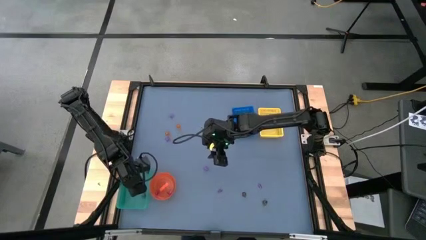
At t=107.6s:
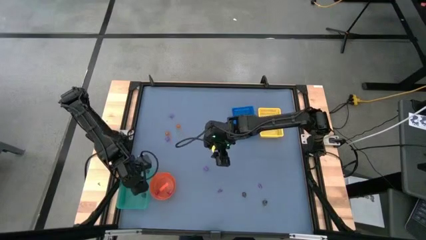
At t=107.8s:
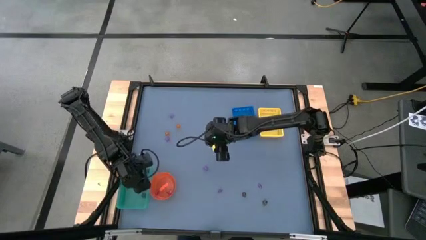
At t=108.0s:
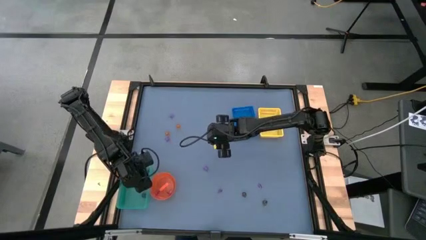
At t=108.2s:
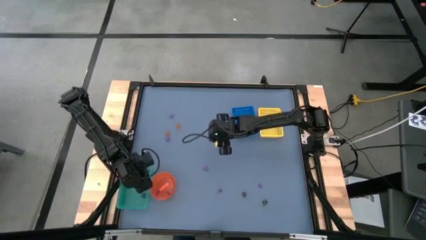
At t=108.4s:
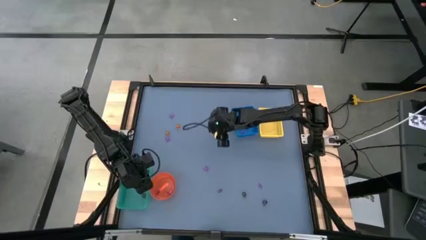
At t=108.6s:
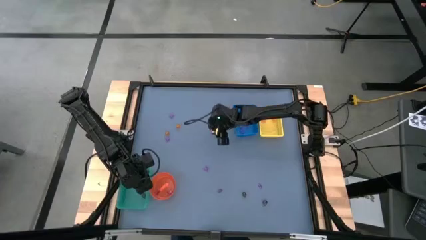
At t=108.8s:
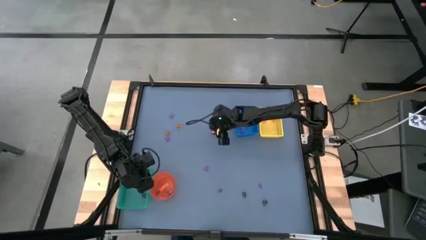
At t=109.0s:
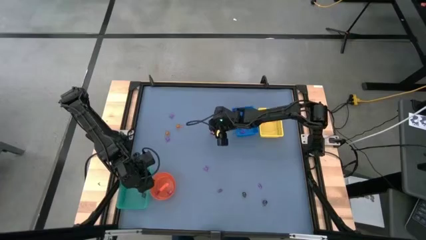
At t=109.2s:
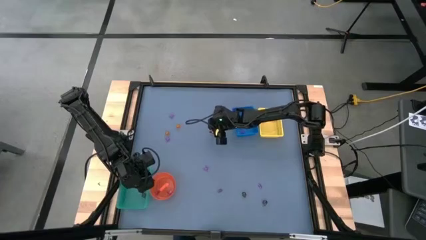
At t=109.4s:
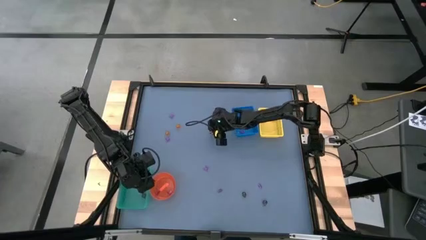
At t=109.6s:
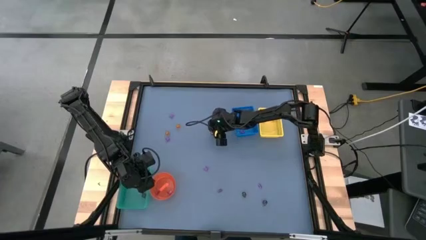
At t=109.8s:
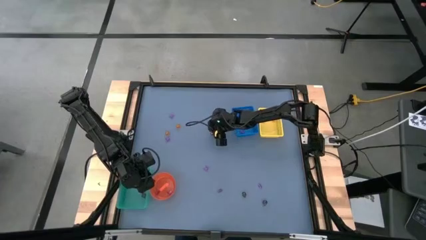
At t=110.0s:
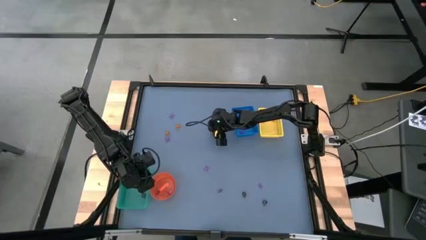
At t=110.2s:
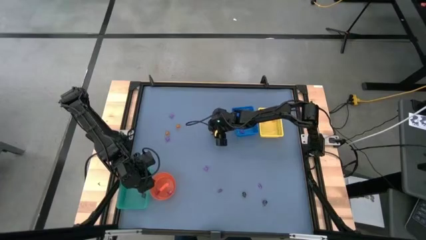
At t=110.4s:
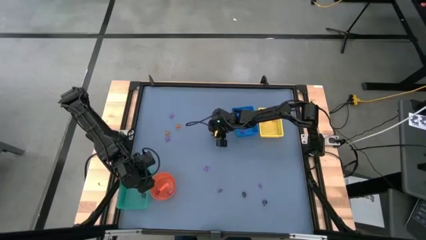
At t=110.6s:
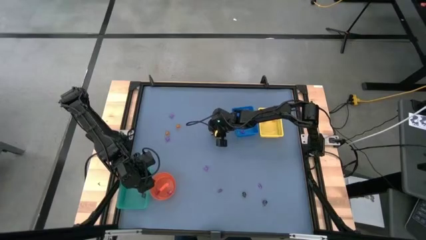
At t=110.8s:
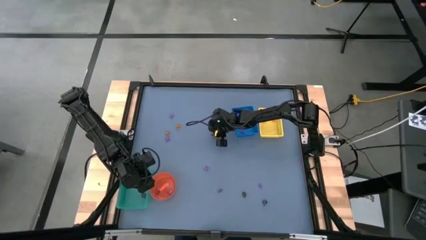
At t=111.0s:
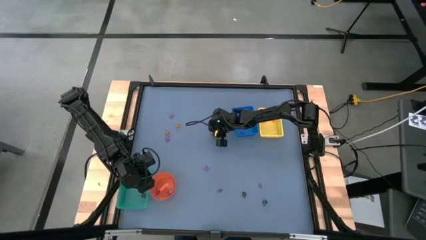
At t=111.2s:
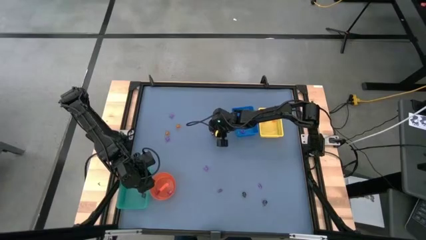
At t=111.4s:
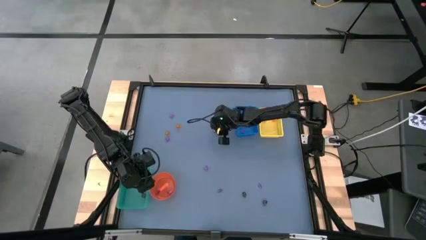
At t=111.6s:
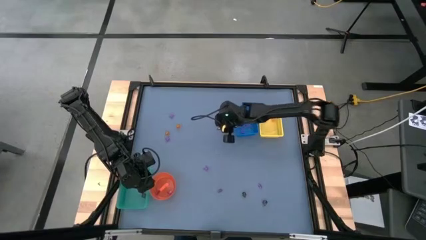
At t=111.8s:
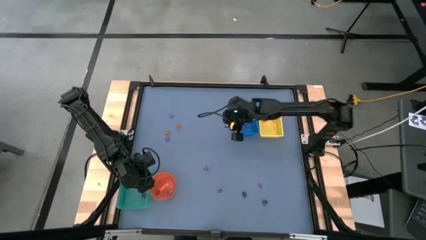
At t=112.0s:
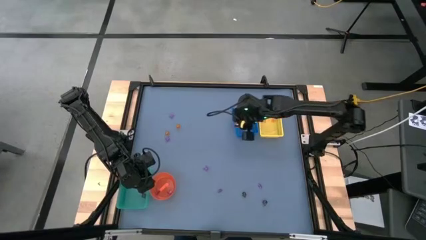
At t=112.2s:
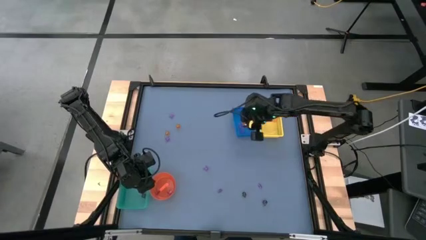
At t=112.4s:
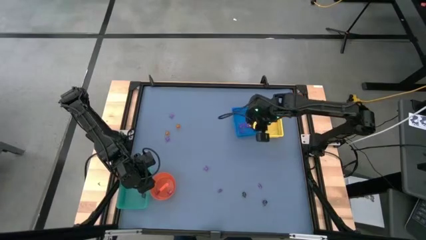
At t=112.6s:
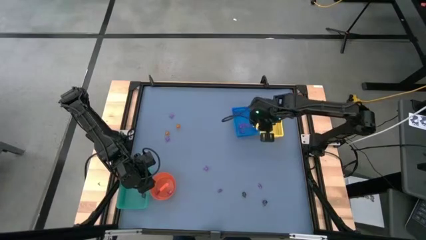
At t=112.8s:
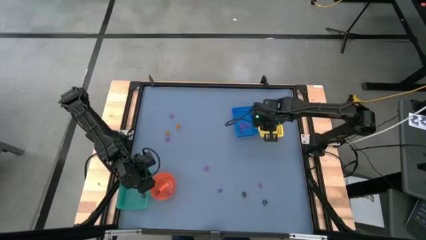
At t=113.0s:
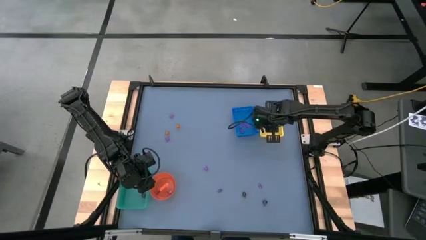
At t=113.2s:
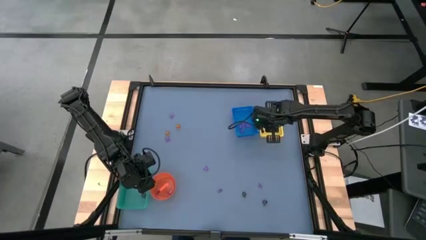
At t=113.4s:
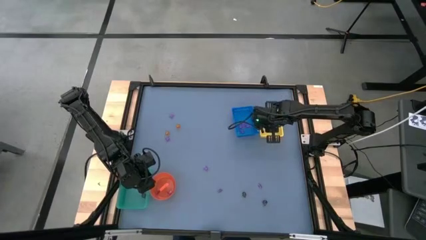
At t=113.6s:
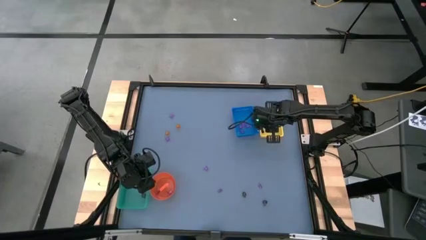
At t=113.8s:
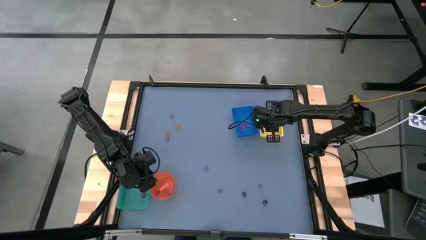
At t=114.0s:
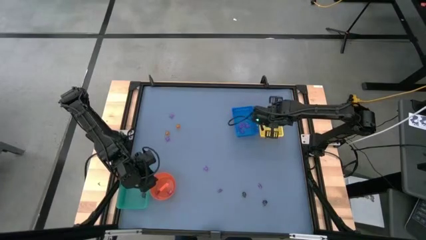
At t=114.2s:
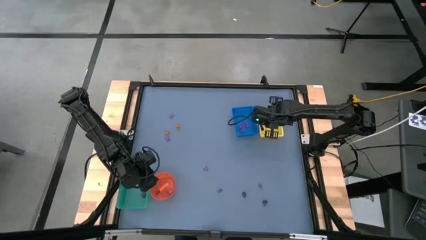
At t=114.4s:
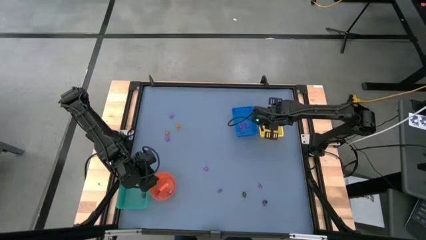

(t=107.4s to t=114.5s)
Task: Sort Halloween decoration
Put the orange pumpkin toy into the yellow box

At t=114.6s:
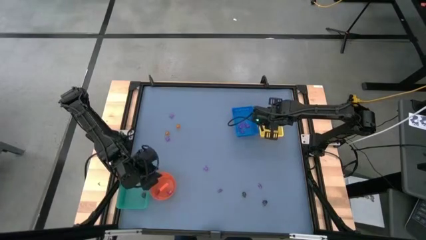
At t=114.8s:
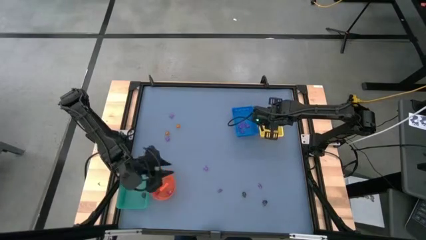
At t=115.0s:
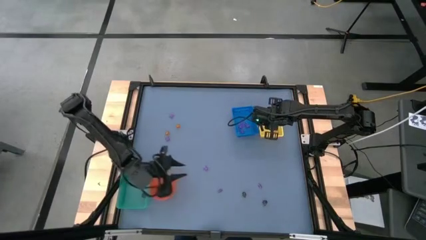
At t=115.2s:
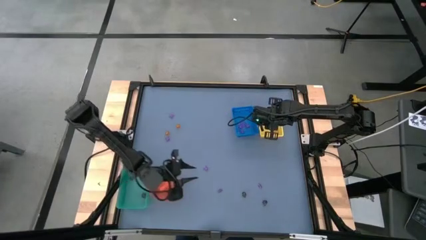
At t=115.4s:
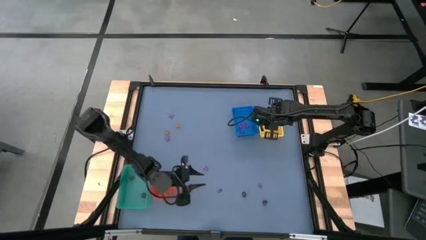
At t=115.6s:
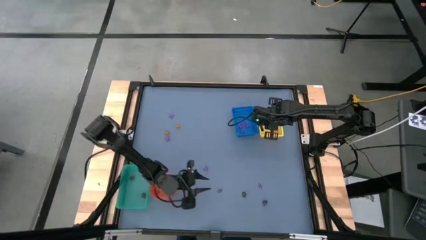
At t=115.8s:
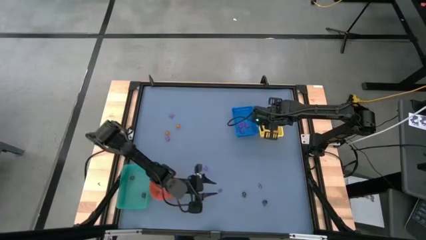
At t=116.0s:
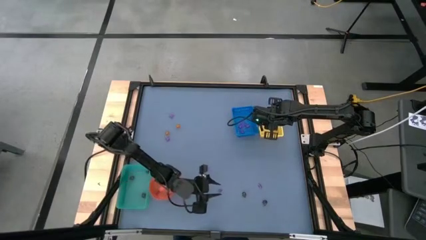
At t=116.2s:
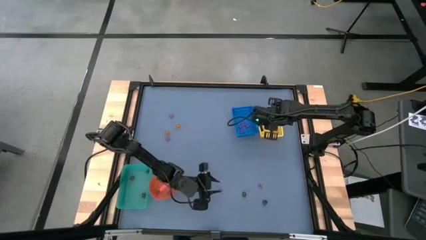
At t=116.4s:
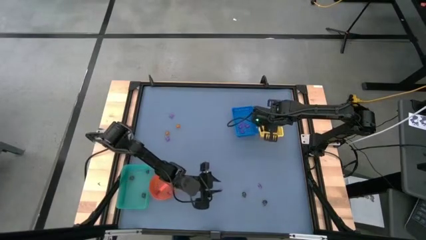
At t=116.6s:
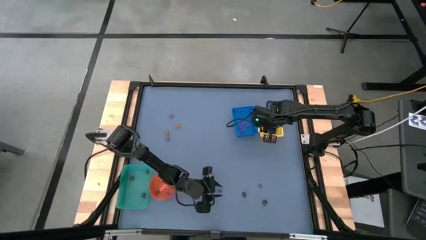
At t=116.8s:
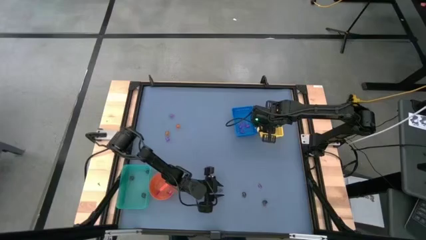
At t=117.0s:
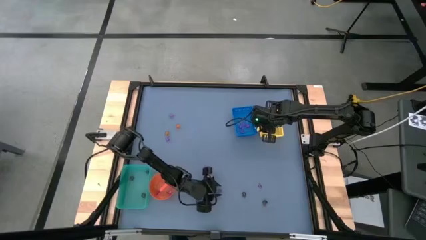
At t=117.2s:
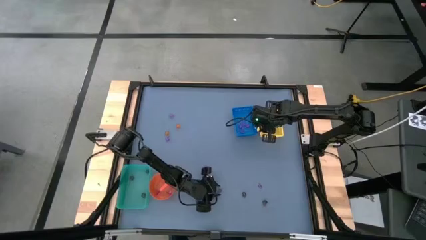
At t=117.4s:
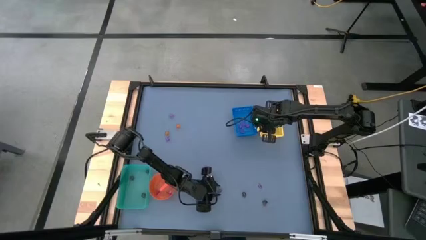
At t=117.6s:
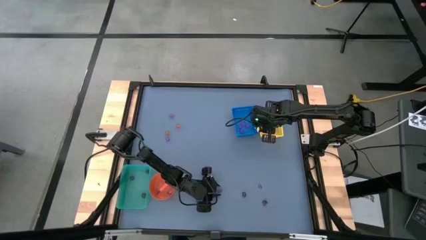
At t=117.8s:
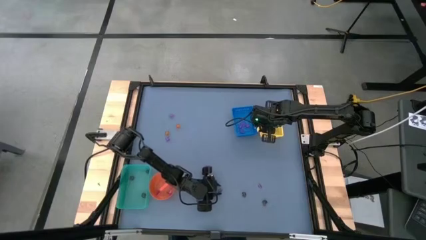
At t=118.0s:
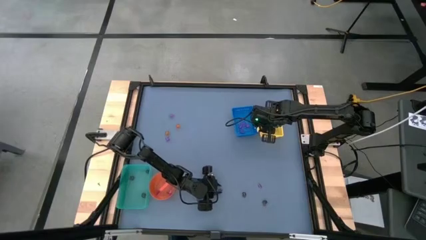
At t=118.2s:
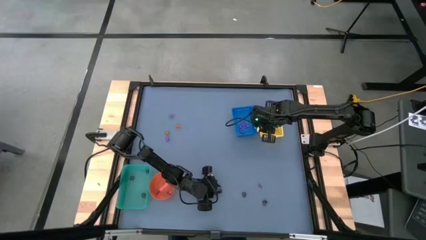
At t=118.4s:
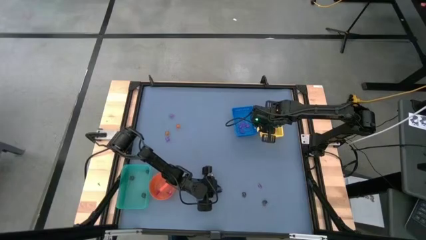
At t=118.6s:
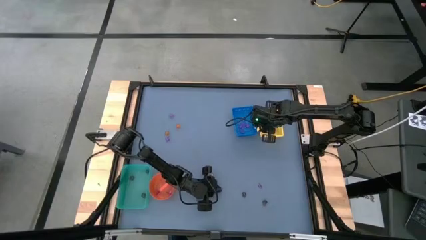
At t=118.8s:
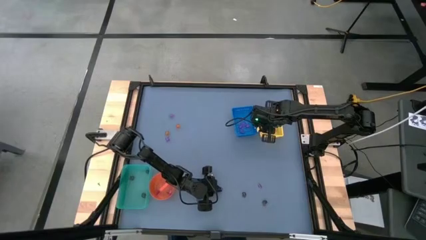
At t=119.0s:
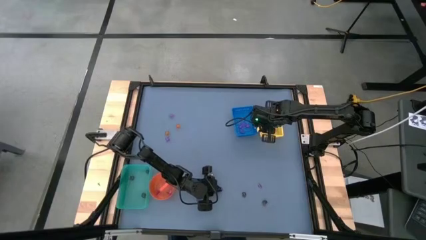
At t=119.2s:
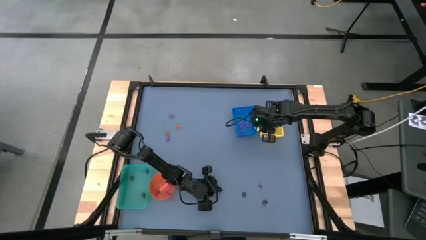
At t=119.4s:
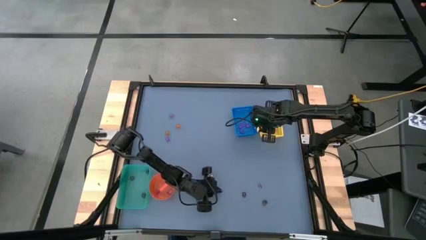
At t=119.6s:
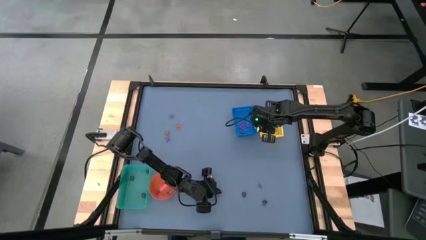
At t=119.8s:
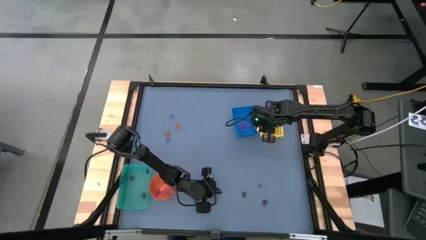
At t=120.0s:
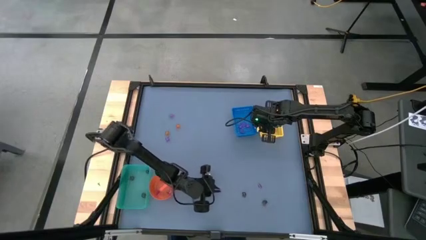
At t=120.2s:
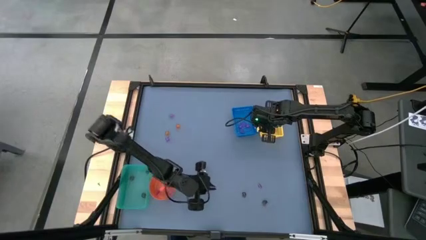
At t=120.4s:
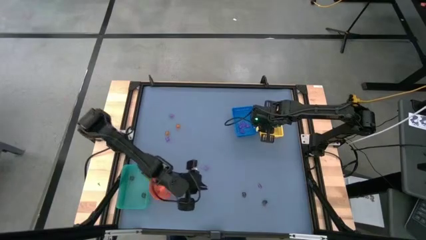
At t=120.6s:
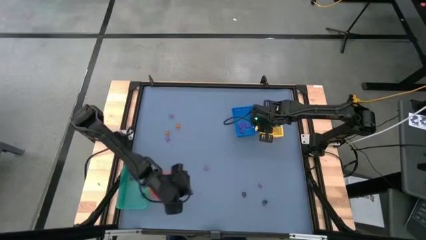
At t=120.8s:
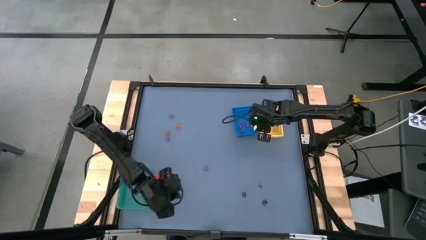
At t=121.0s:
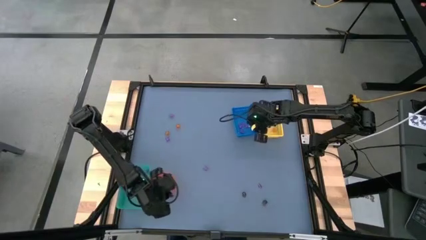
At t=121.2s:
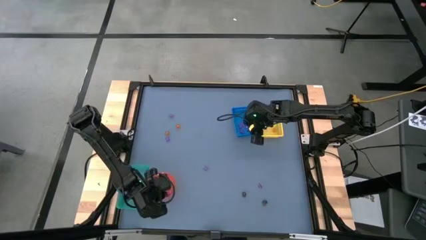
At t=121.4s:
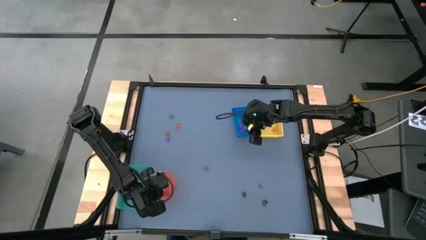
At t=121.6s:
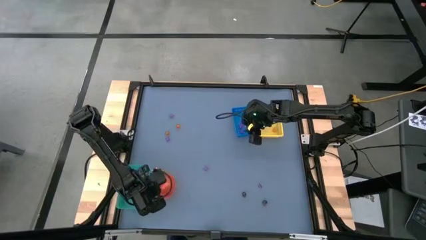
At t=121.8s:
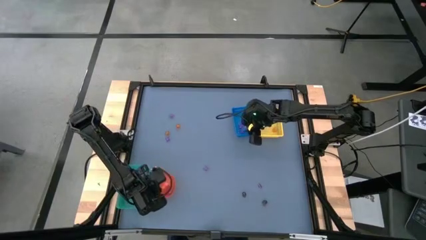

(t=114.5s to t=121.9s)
Put the violet witch hat toy into the orange bin
